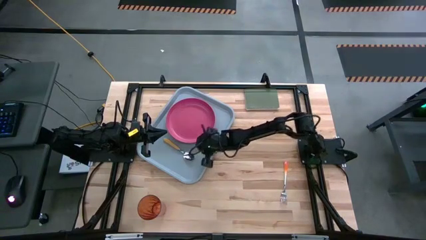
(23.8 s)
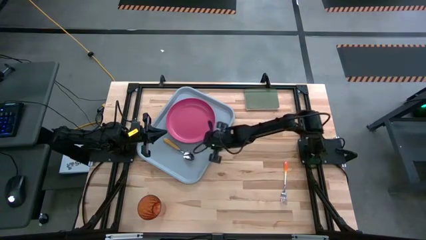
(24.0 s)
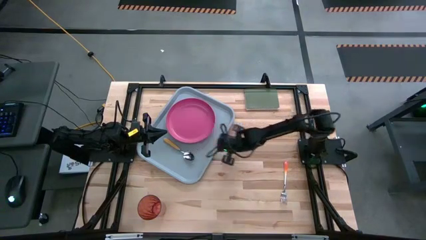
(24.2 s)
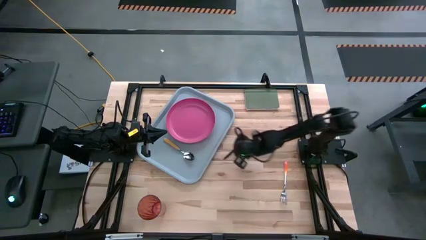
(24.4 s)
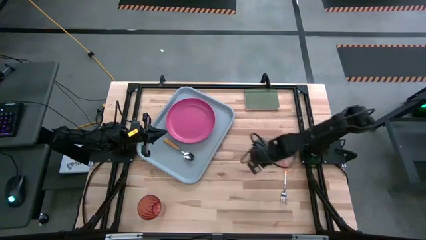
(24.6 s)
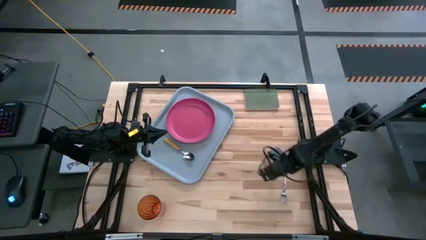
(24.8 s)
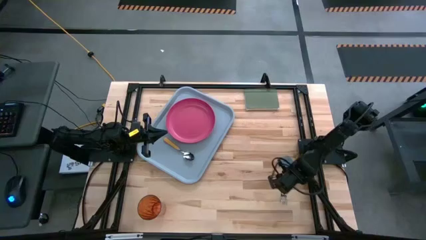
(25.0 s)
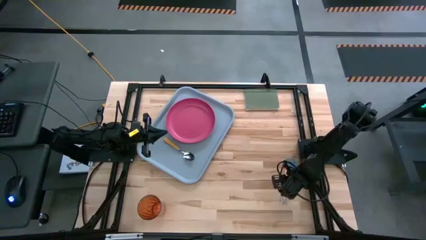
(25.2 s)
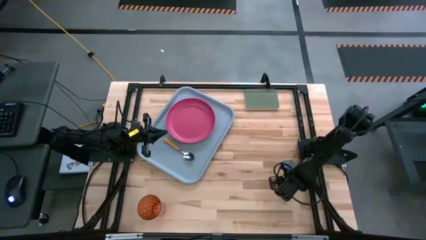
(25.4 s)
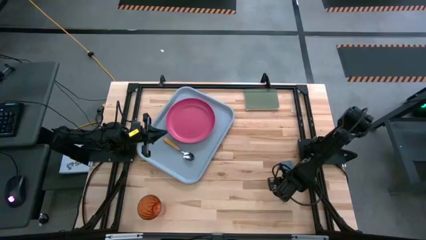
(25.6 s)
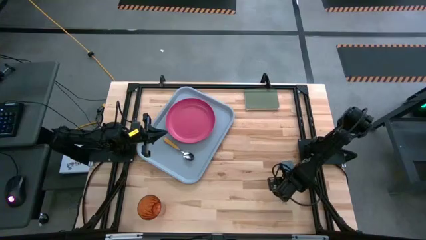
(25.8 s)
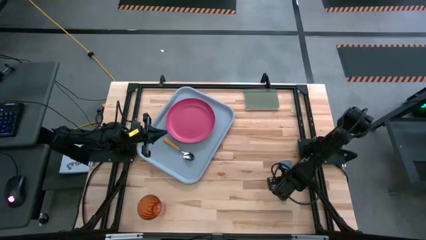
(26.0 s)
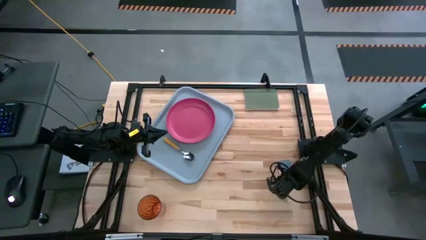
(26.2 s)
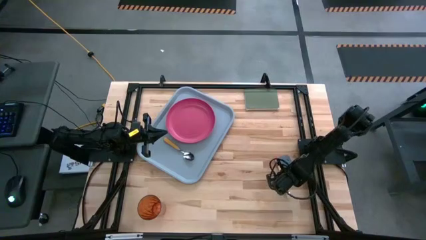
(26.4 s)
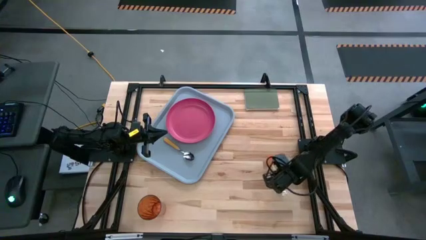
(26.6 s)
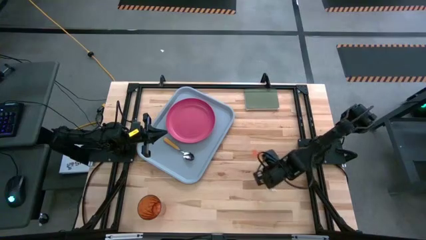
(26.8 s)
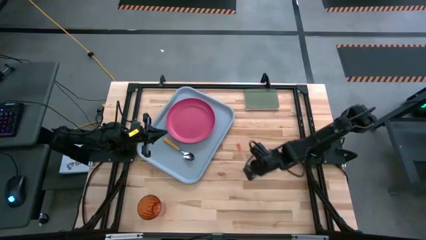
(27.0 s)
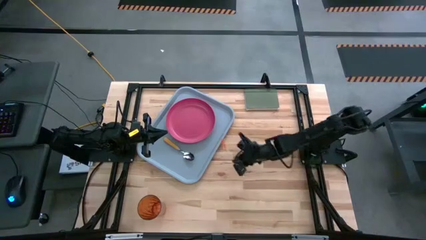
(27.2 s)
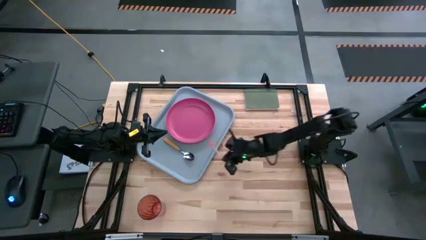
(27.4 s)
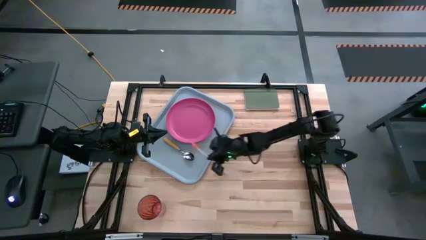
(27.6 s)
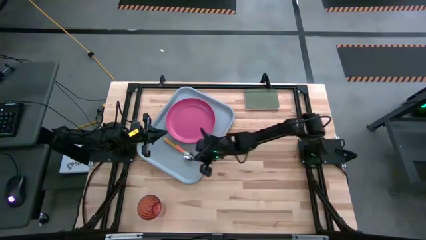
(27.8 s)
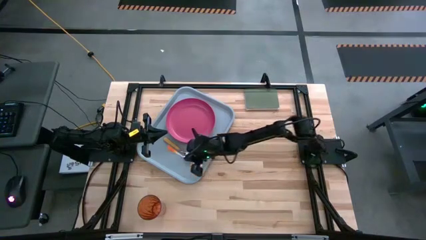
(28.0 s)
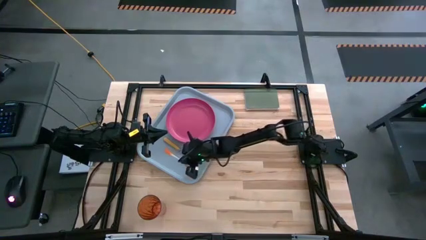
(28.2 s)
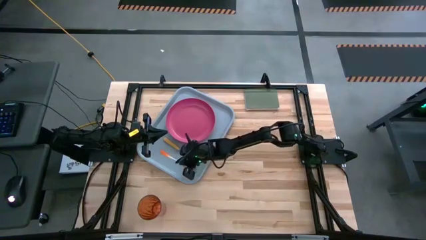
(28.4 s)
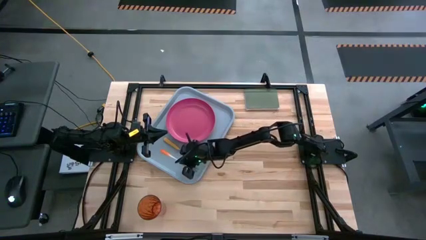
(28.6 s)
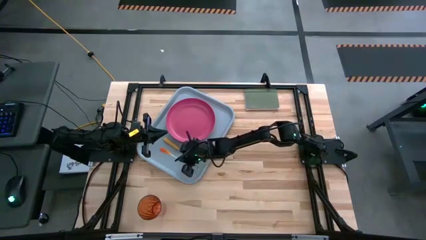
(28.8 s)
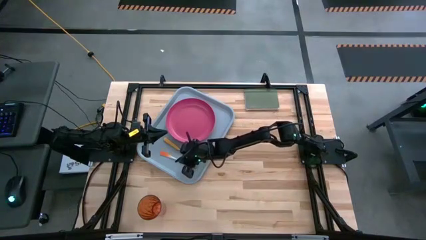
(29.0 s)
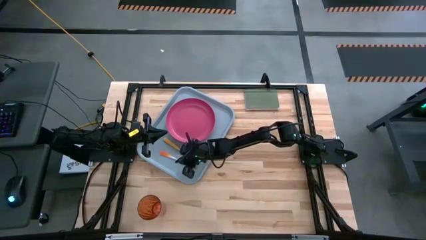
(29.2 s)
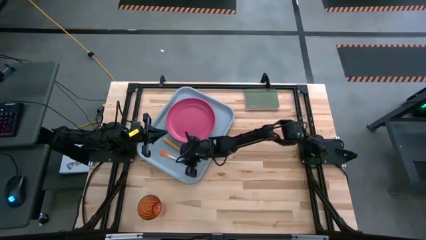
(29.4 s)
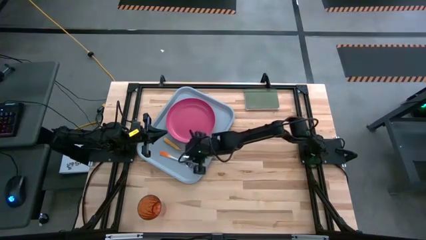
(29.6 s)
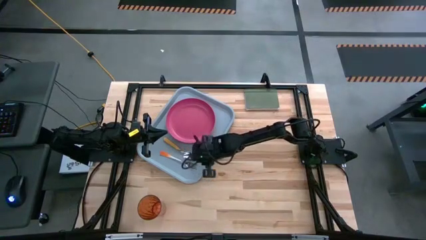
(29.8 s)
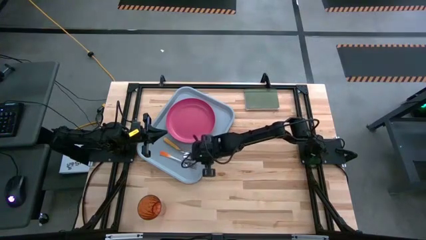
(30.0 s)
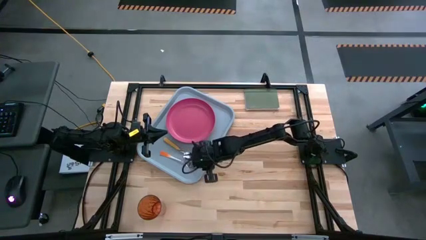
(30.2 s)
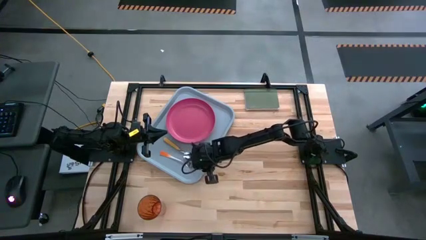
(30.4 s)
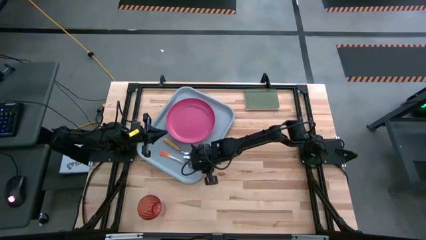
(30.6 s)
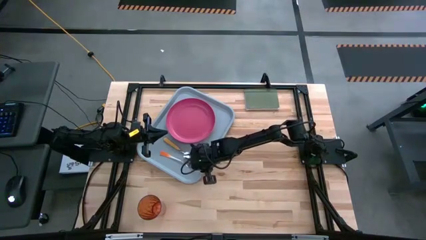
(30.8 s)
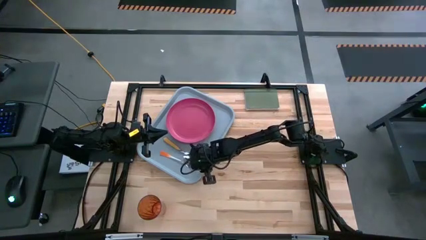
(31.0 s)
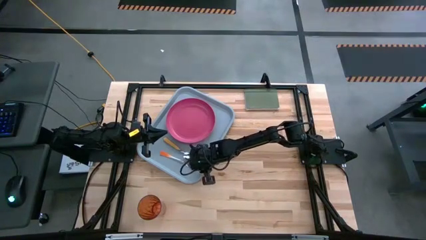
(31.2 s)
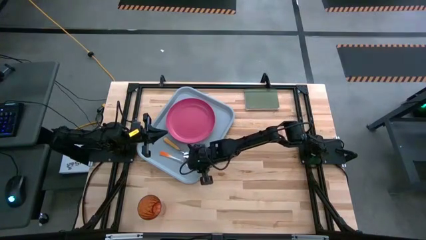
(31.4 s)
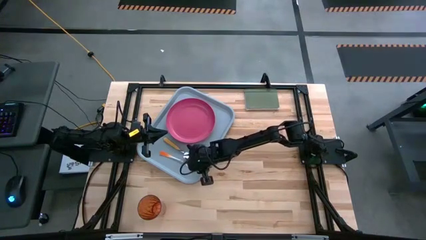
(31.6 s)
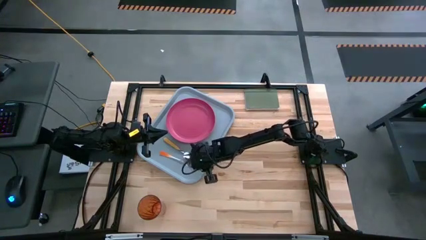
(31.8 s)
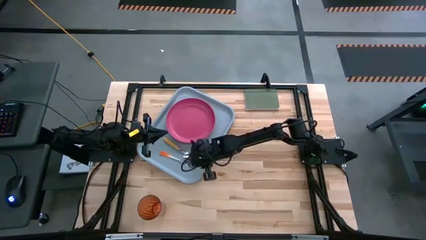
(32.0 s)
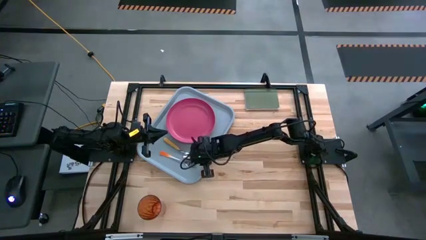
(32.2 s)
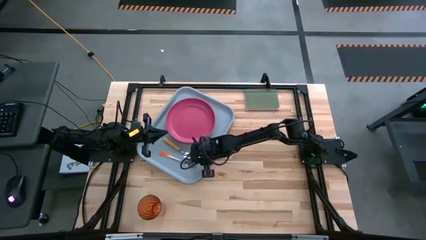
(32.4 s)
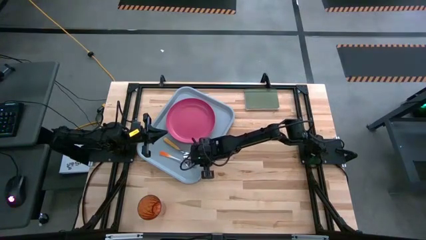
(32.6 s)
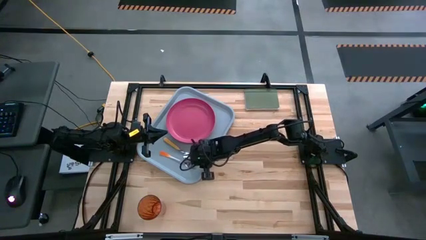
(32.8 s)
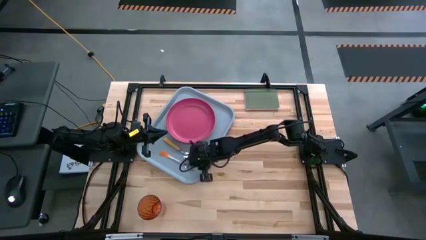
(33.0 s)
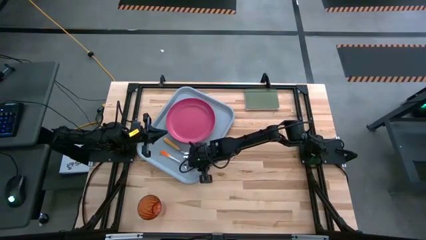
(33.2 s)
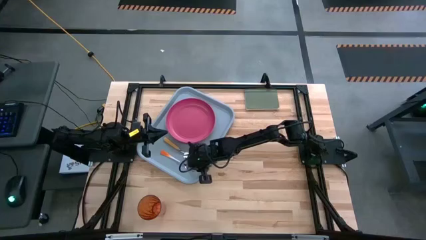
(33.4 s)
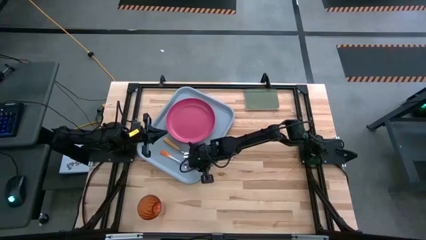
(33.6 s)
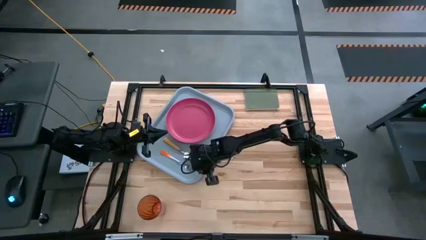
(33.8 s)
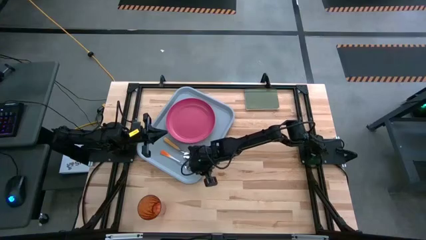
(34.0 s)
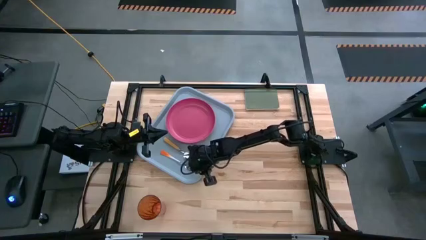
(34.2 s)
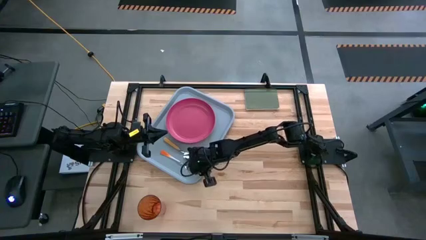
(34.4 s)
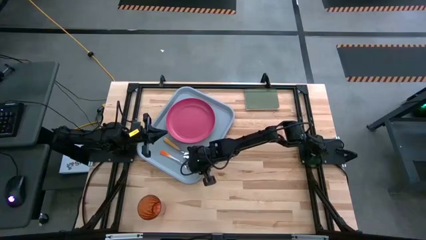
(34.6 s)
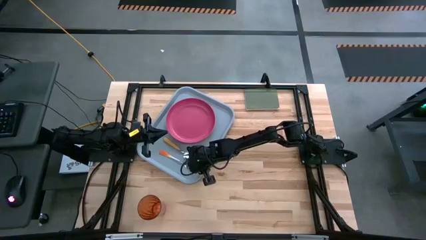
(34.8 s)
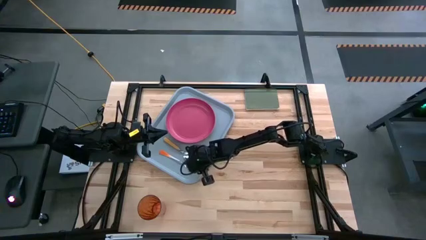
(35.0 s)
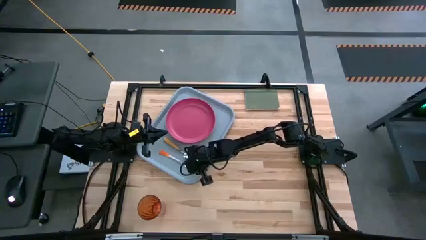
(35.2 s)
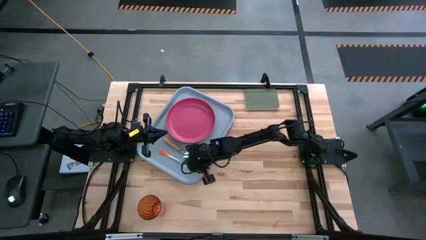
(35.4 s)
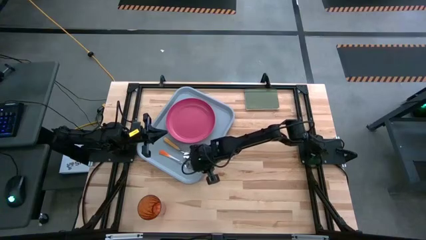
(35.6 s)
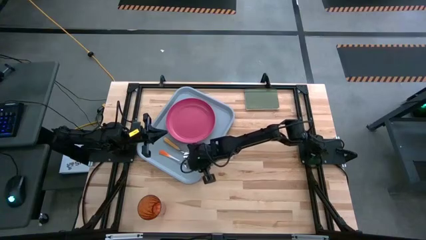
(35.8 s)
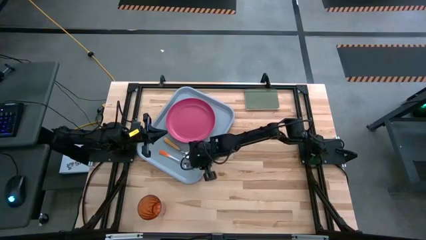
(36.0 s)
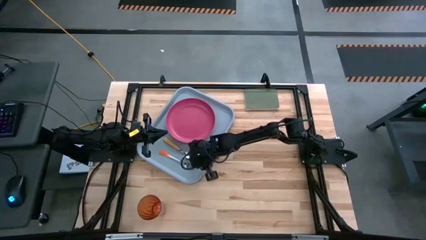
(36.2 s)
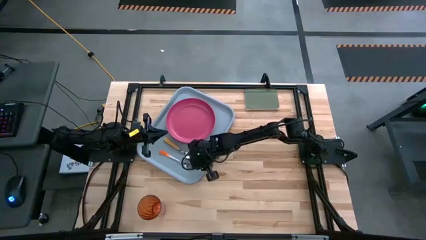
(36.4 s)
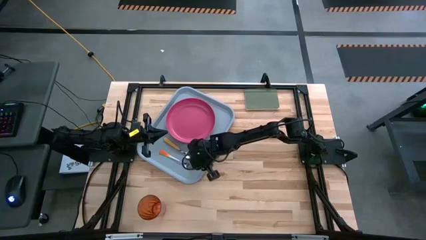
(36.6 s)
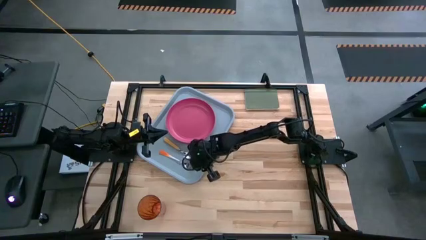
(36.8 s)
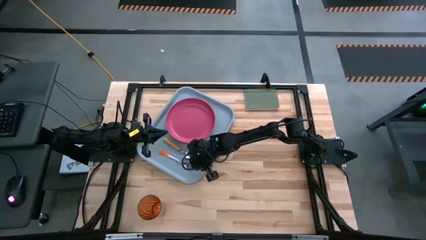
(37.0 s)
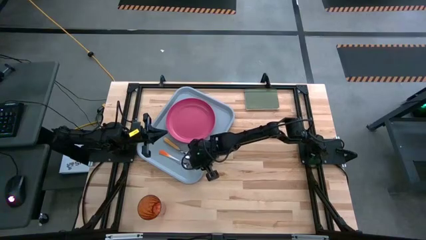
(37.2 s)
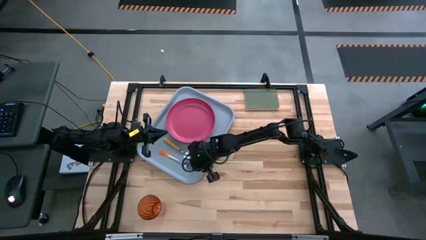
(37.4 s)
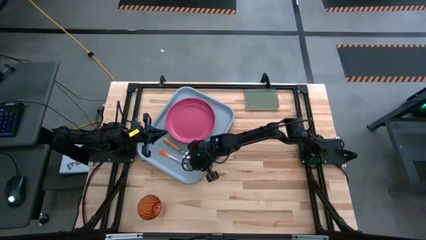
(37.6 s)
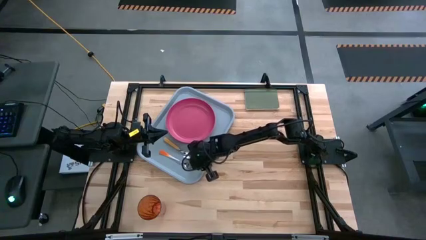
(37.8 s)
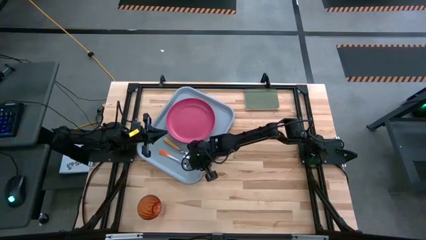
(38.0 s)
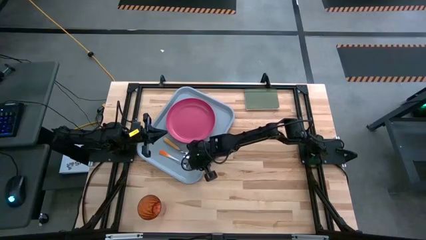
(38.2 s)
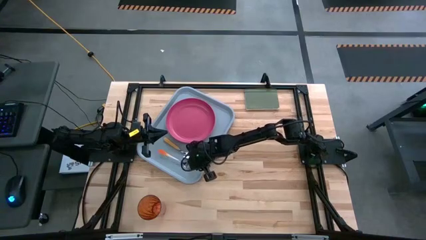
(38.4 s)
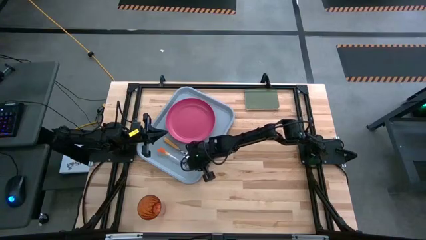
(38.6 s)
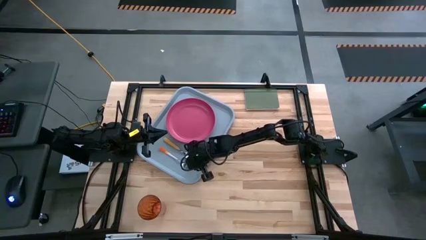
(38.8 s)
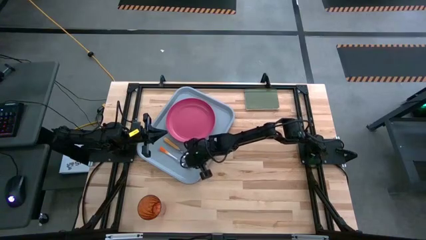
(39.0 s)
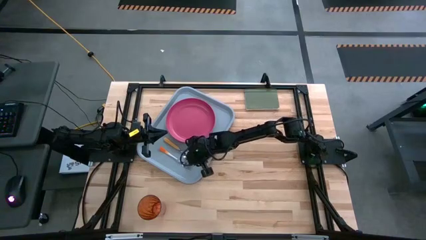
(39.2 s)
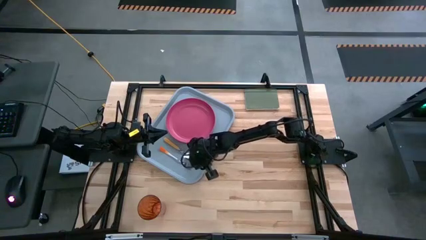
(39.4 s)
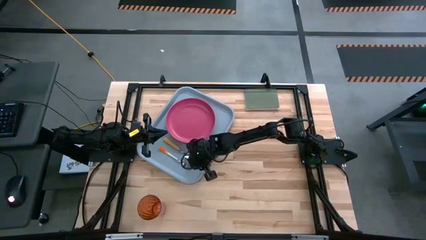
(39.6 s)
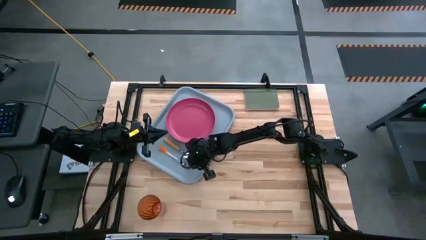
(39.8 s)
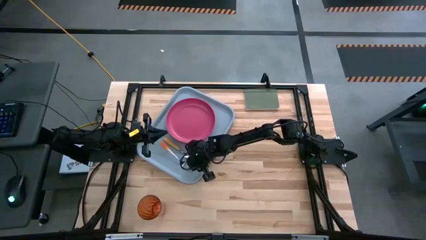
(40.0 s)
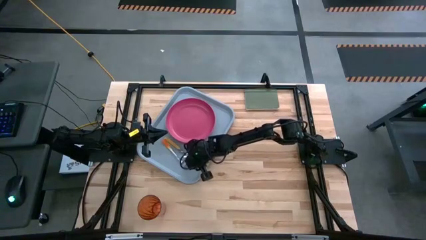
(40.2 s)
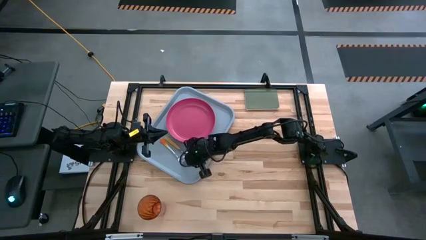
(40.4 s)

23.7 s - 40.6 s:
Task: Pick and place plate/cup/fork/spoon on tray
Put the orange fork on the grey tray to the bottom of the yellow spoon
